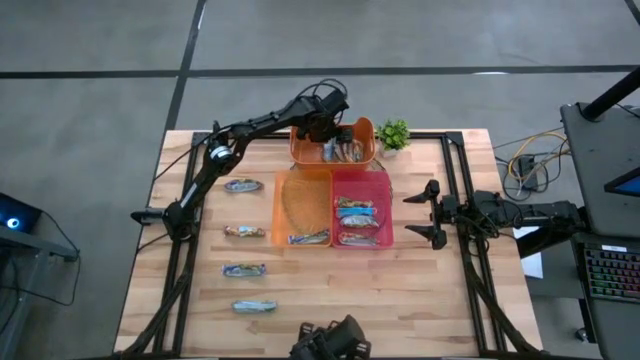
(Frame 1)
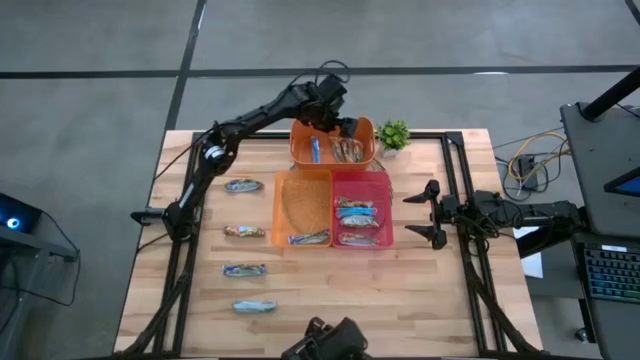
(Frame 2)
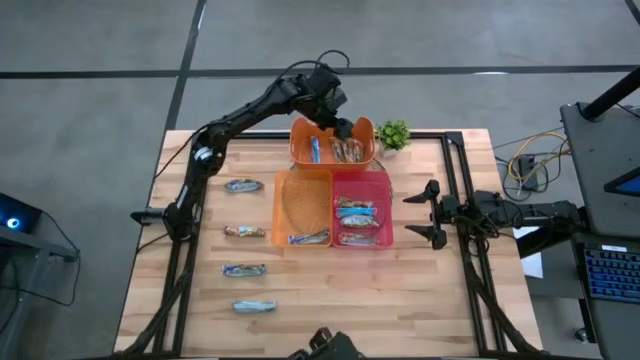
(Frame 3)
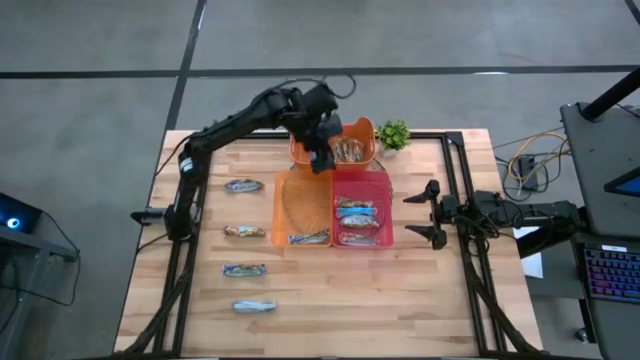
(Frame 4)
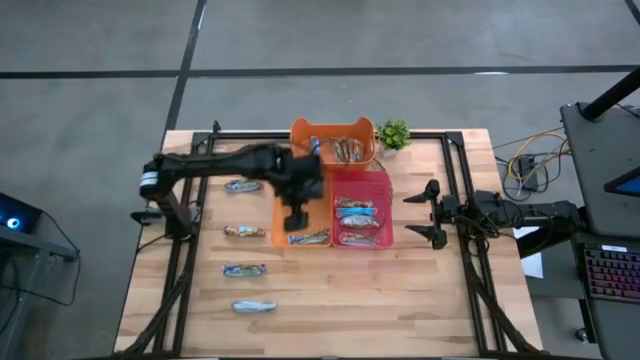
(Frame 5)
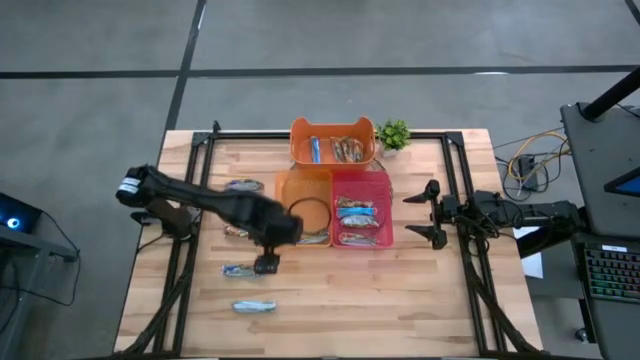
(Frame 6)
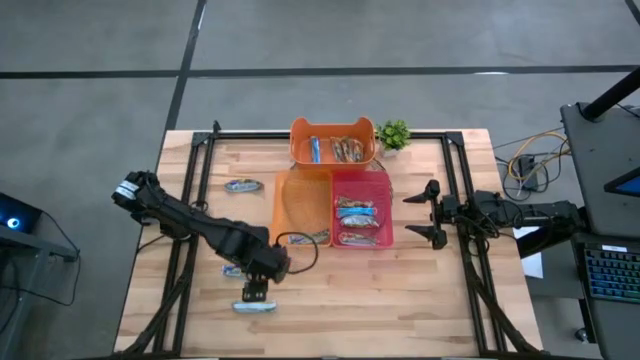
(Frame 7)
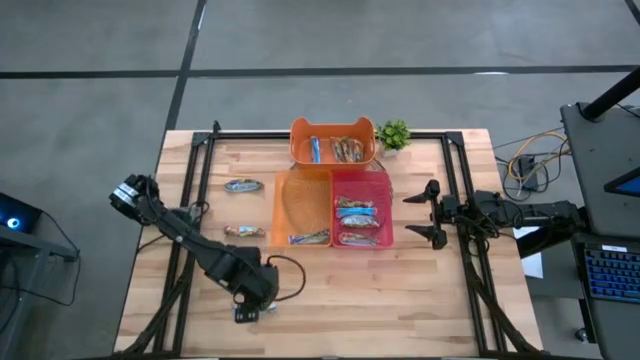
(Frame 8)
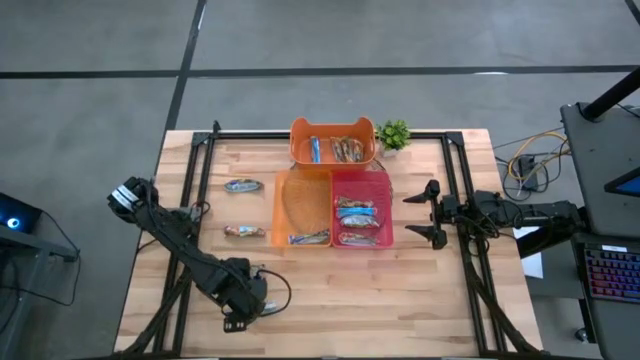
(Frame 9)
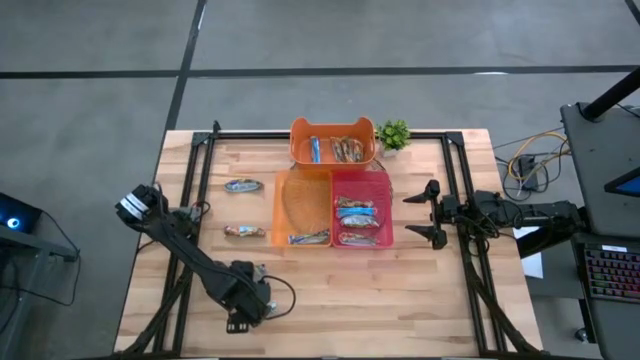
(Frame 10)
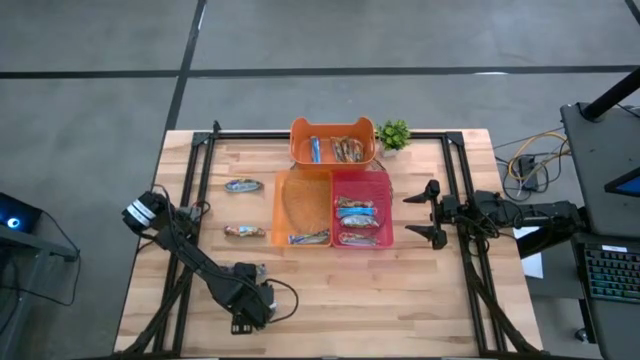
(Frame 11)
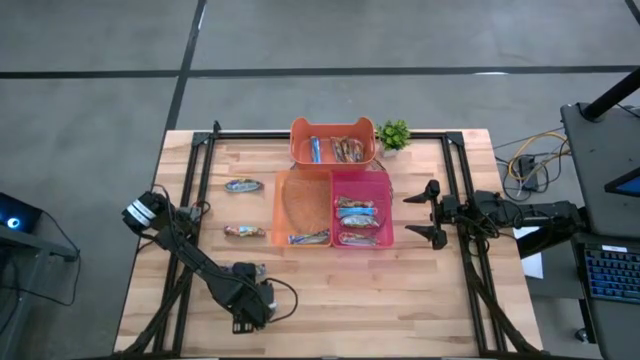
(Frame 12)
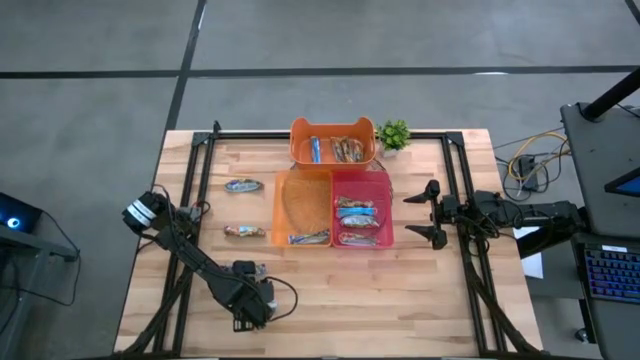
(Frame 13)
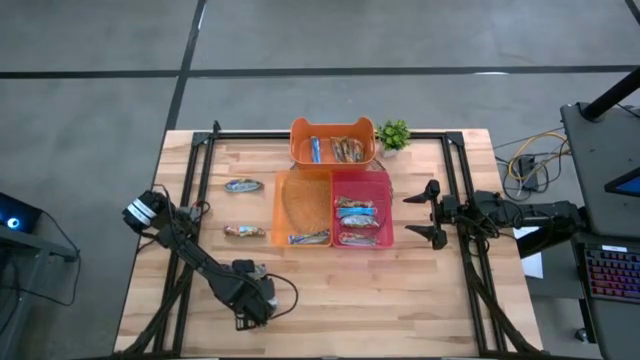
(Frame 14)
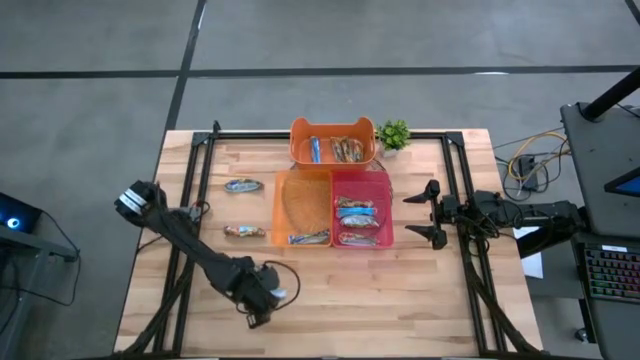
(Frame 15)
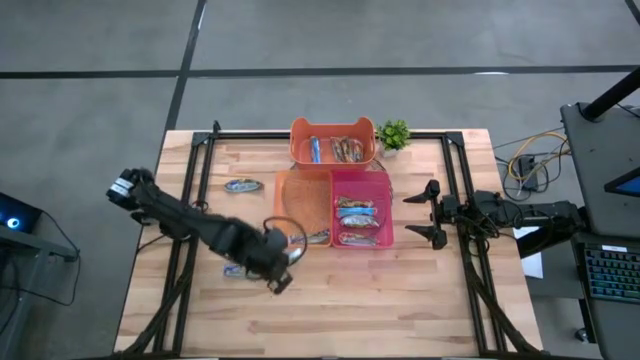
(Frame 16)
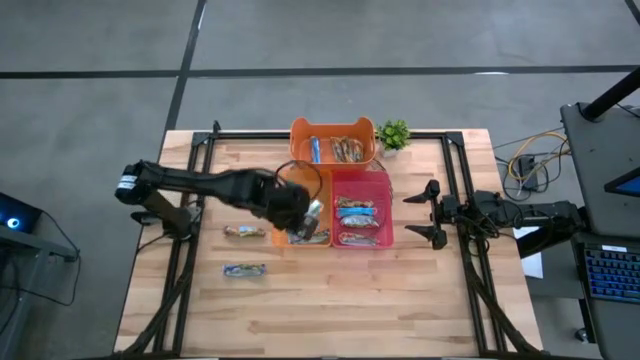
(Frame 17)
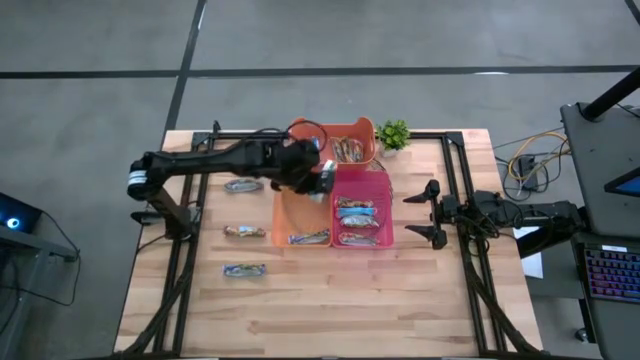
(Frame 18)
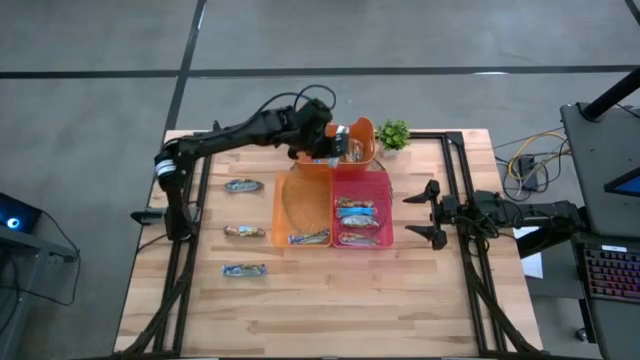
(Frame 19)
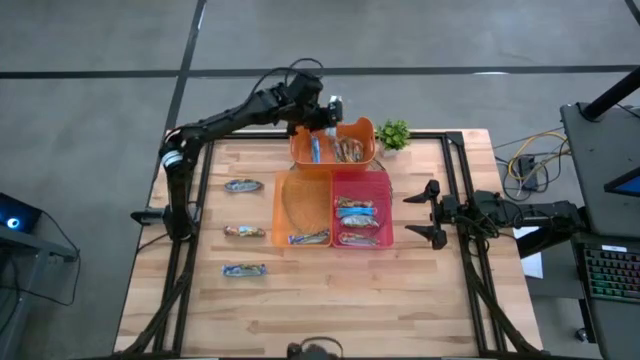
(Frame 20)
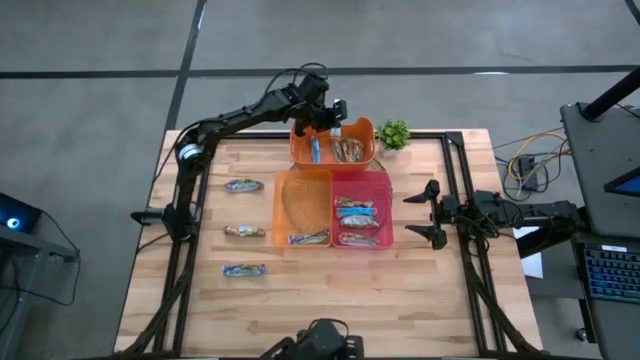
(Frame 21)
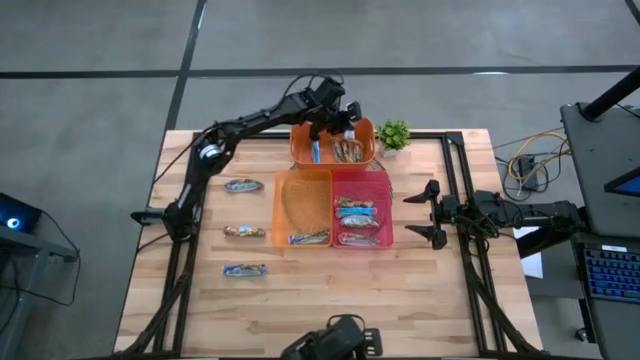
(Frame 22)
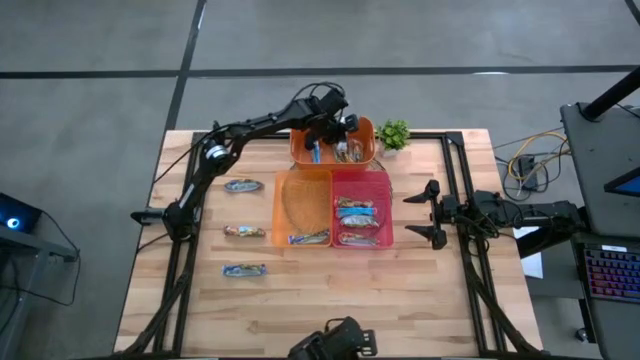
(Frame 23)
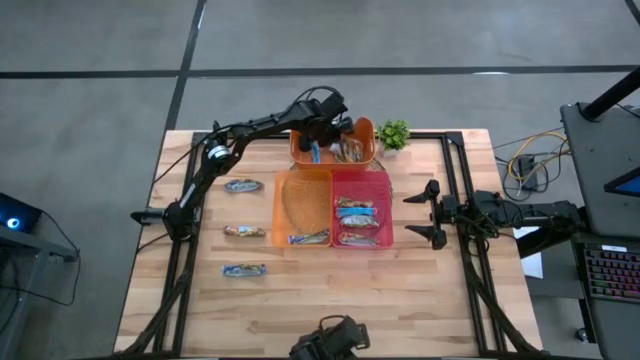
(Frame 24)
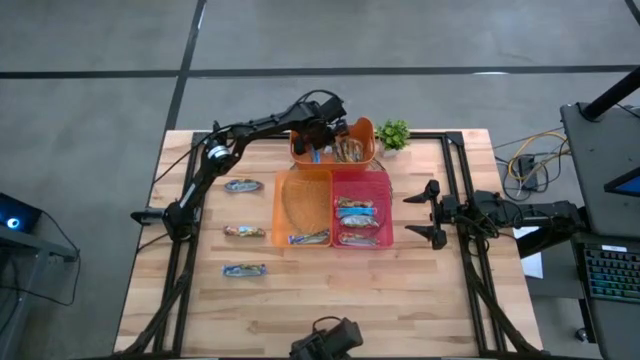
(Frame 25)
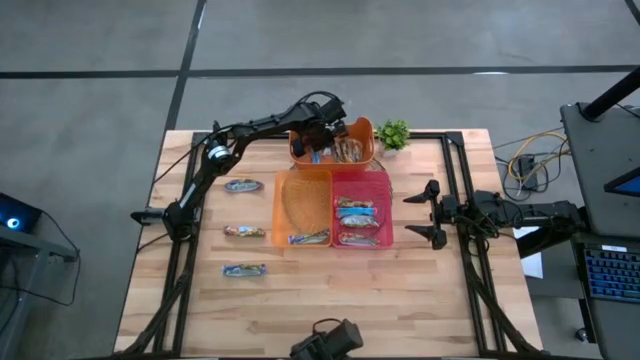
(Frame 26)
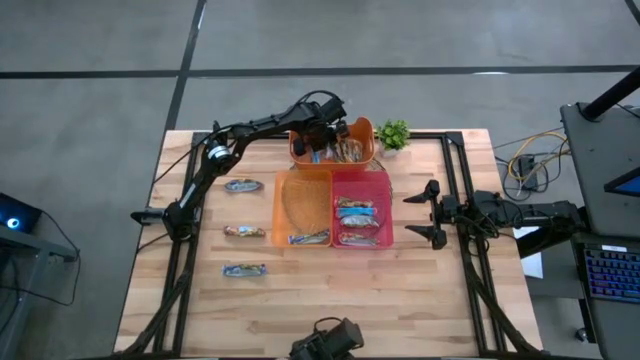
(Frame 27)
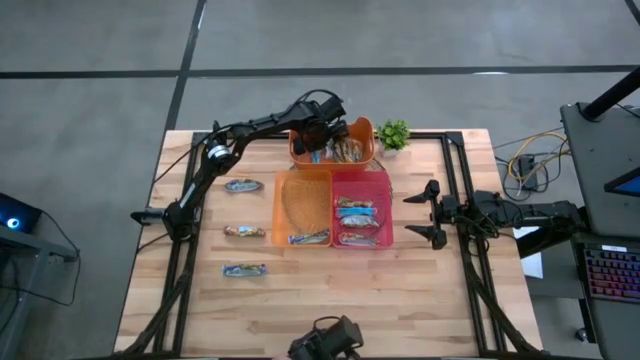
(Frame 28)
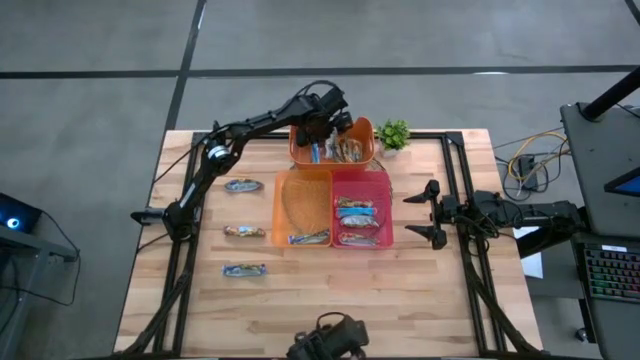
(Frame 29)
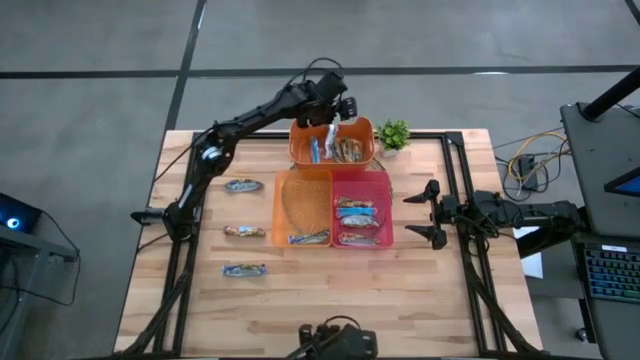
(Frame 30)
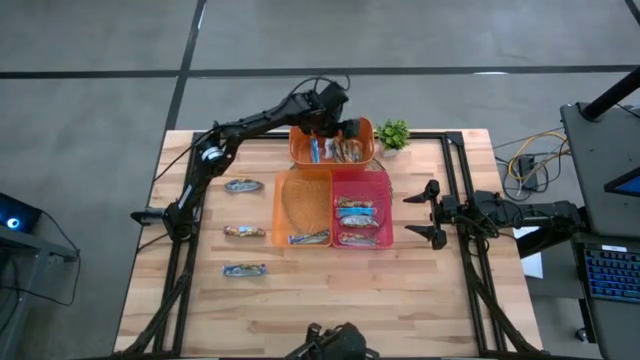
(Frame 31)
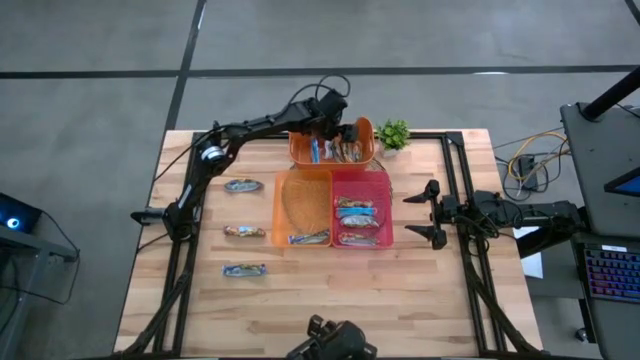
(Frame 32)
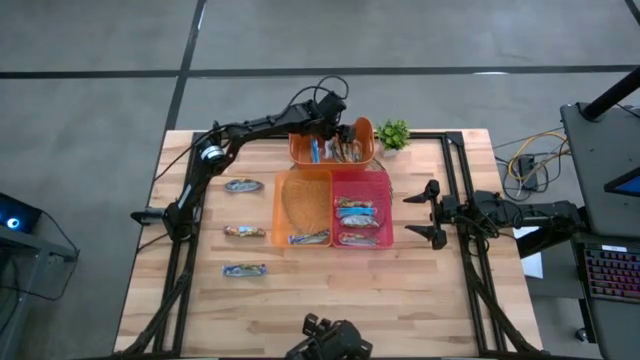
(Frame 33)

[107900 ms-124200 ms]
Task: Pick and place Granola Bars by type
Put the yellow granola bar into the orange bin

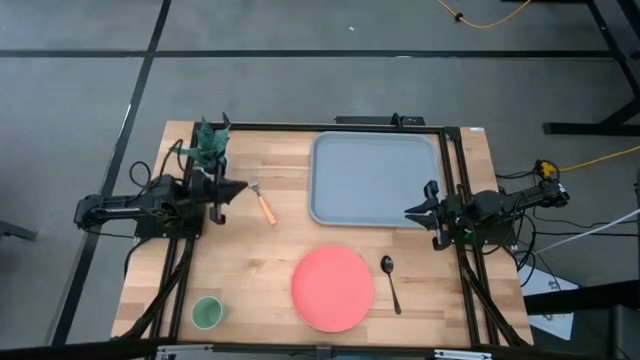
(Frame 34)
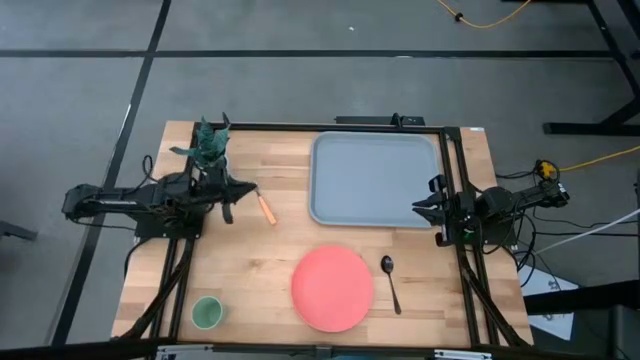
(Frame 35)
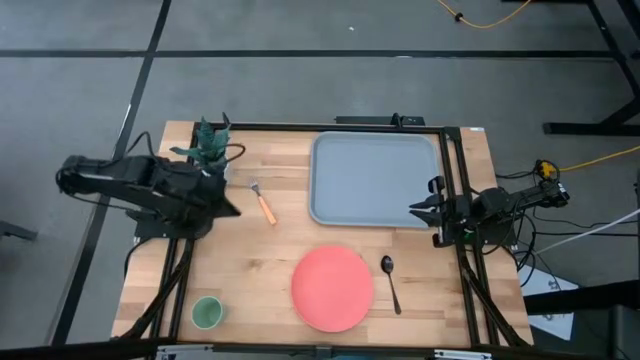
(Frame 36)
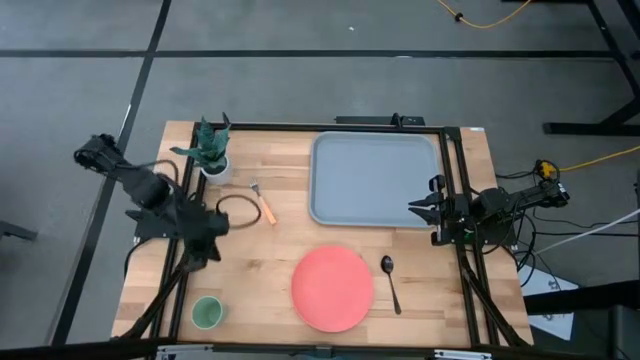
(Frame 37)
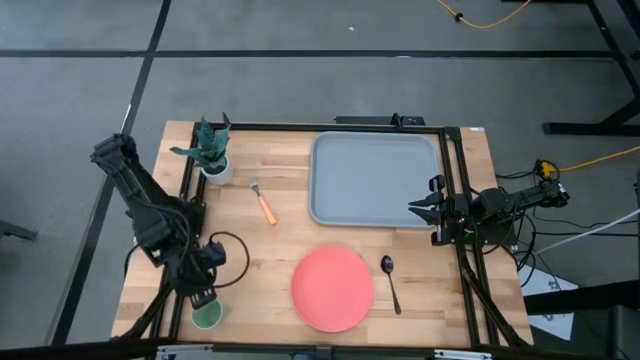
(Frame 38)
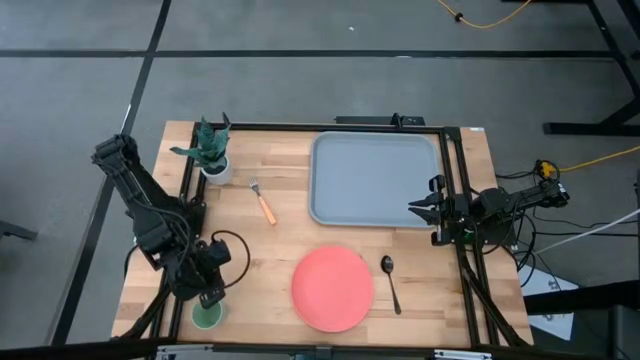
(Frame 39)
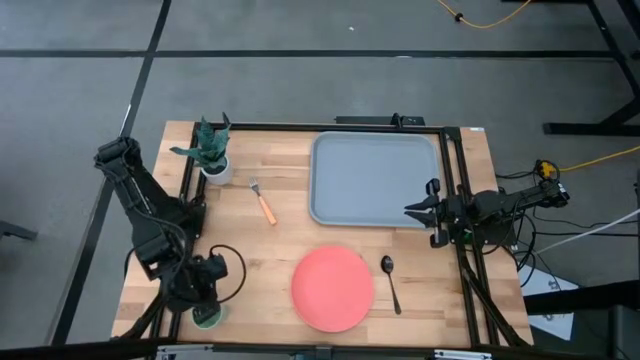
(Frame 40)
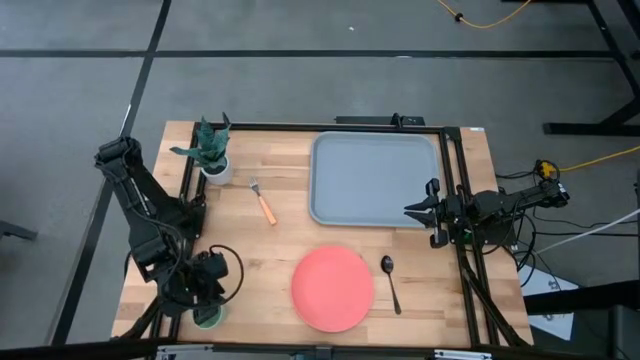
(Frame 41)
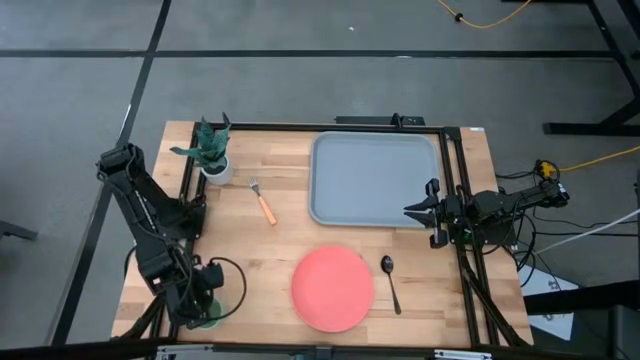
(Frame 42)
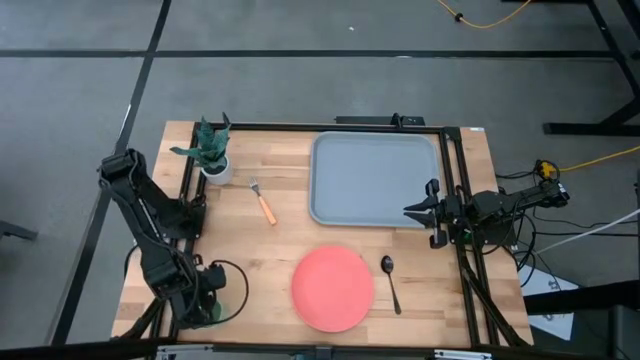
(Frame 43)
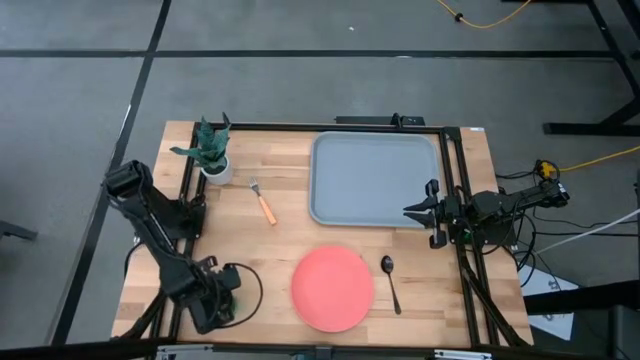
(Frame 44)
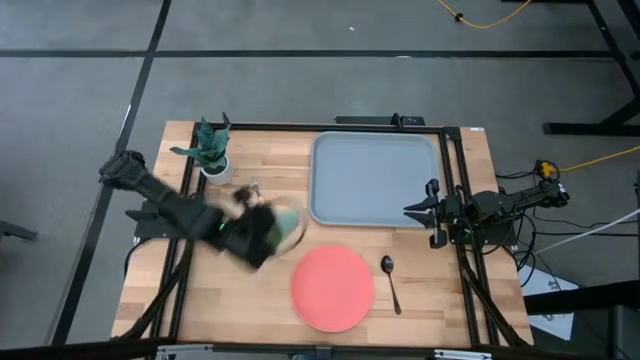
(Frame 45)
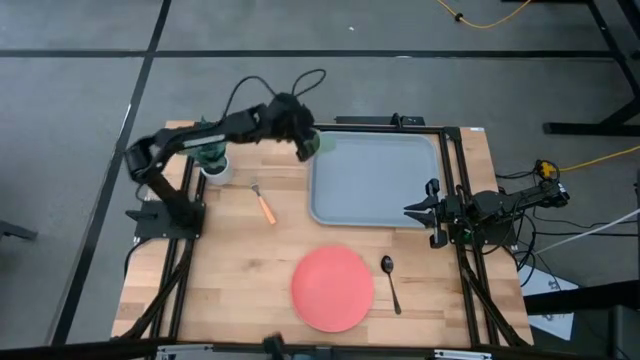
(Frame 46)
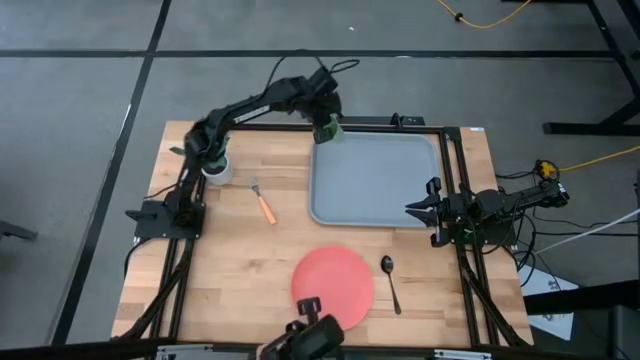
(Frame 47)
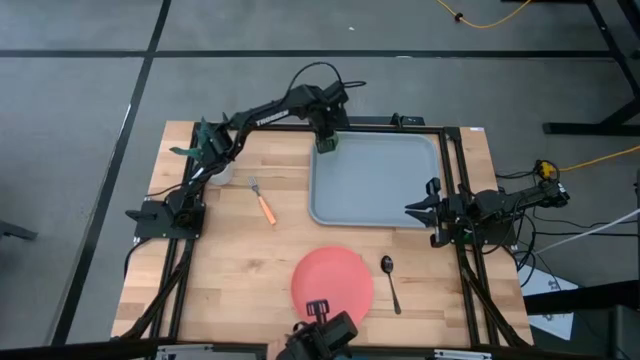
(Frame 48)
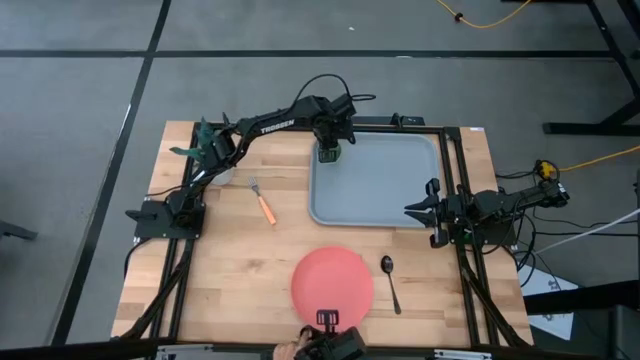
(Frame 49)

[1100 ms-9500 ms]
Task: Pick and place plate/cup/fork/spoon on tray
Put the green cup to the top left of the blue serving tray
